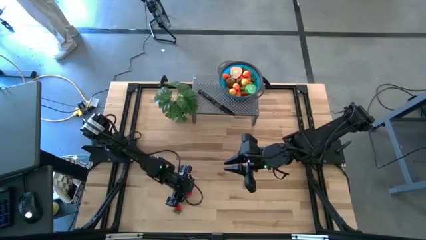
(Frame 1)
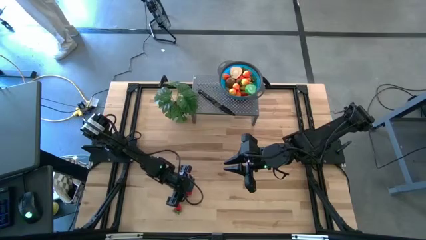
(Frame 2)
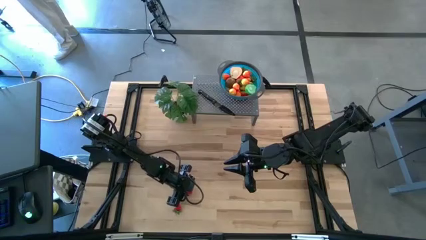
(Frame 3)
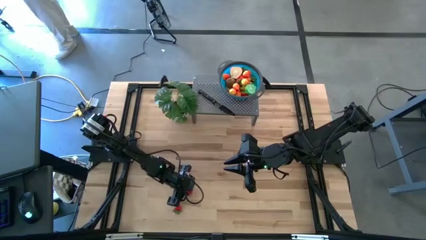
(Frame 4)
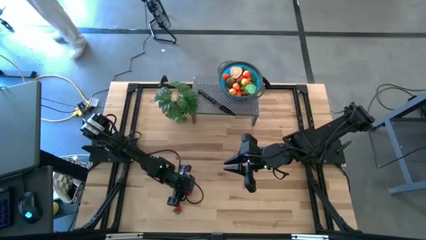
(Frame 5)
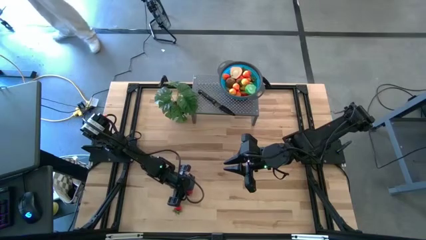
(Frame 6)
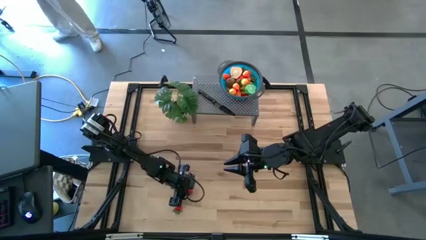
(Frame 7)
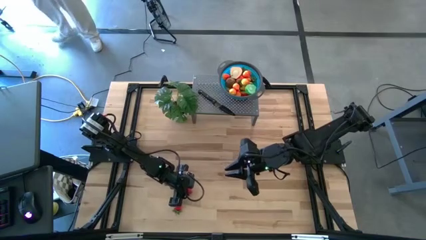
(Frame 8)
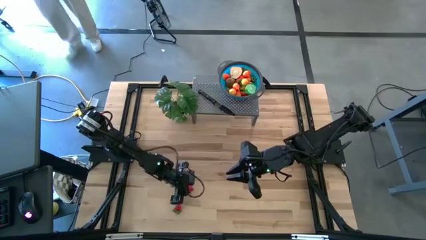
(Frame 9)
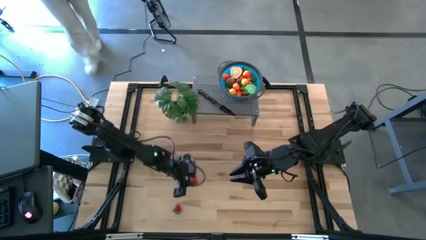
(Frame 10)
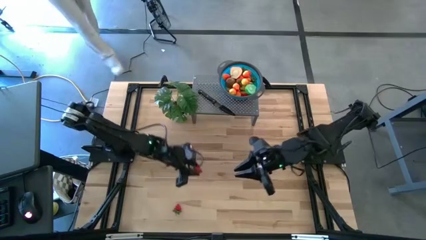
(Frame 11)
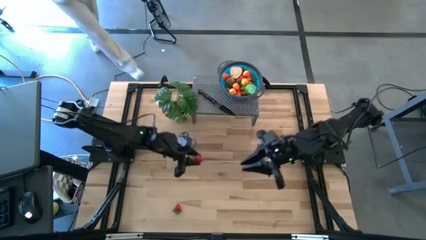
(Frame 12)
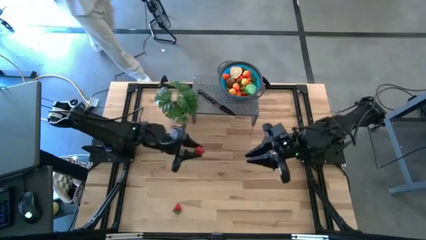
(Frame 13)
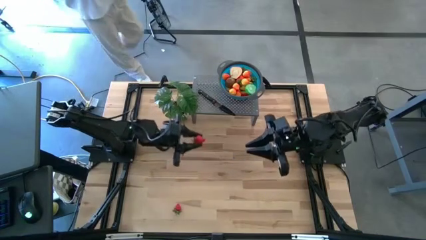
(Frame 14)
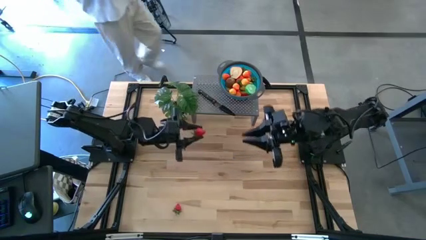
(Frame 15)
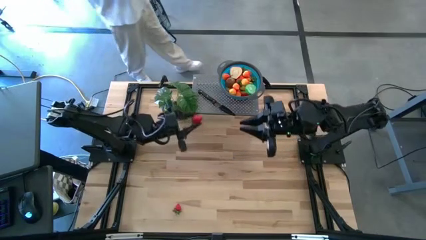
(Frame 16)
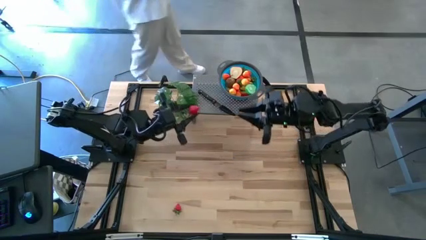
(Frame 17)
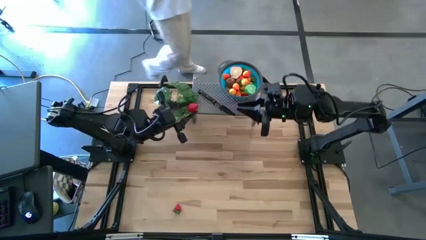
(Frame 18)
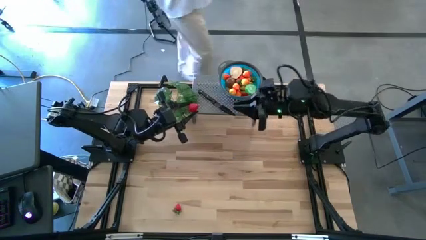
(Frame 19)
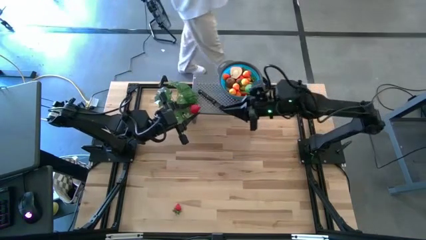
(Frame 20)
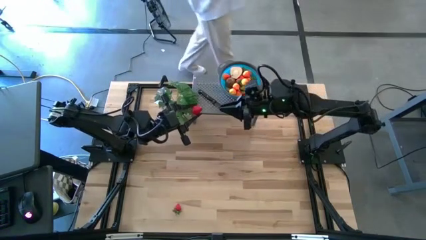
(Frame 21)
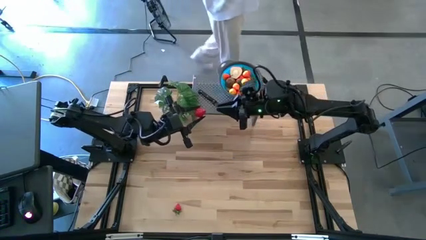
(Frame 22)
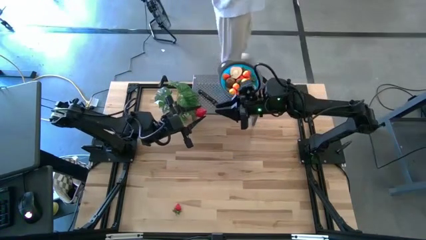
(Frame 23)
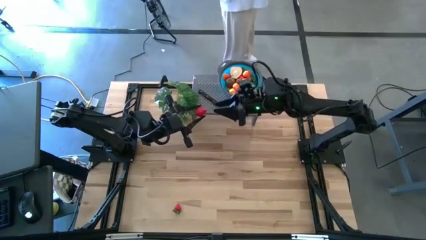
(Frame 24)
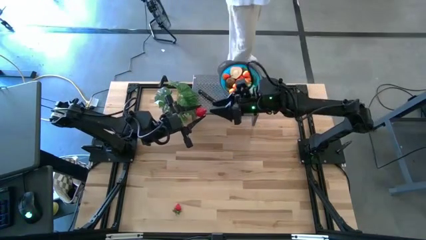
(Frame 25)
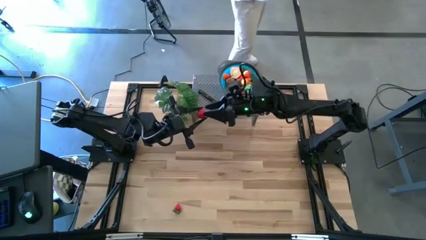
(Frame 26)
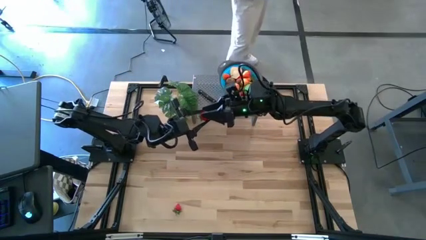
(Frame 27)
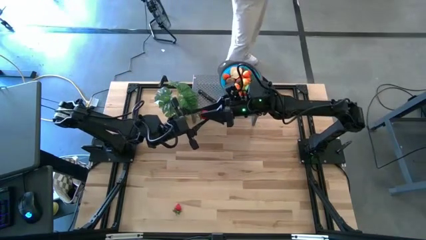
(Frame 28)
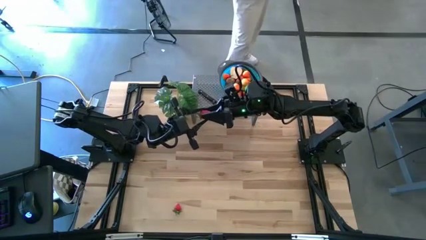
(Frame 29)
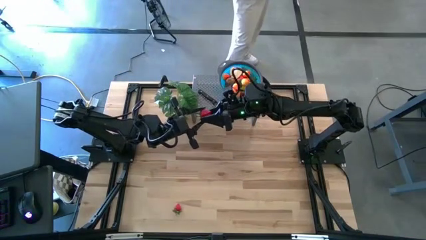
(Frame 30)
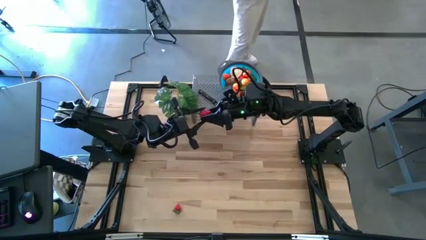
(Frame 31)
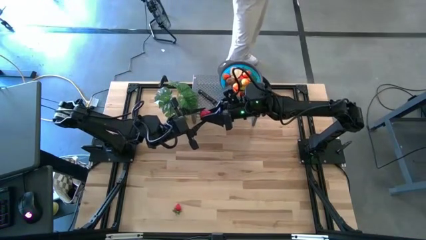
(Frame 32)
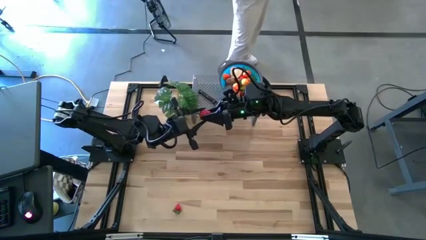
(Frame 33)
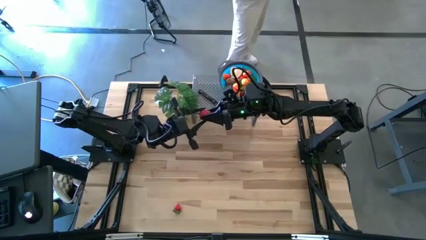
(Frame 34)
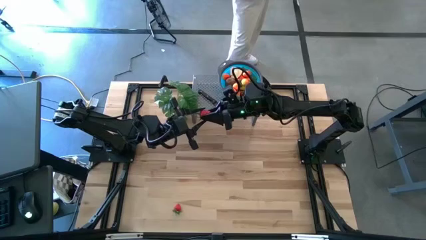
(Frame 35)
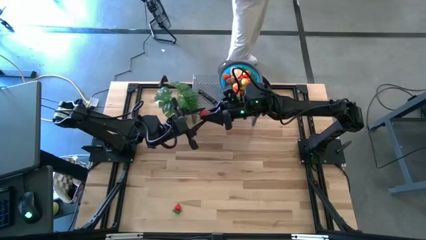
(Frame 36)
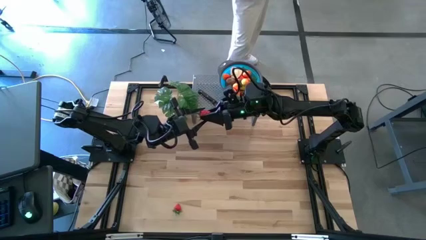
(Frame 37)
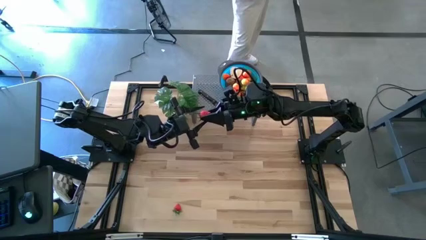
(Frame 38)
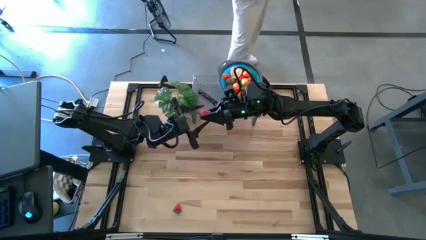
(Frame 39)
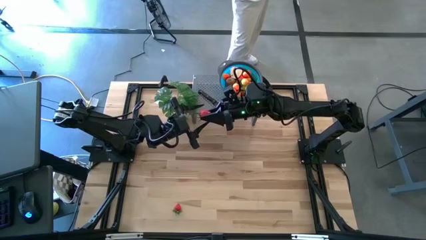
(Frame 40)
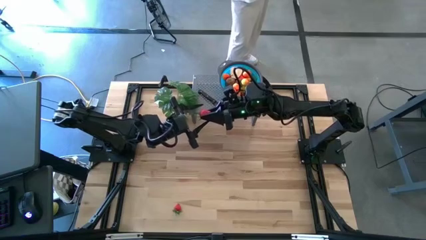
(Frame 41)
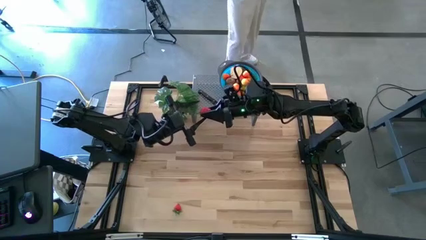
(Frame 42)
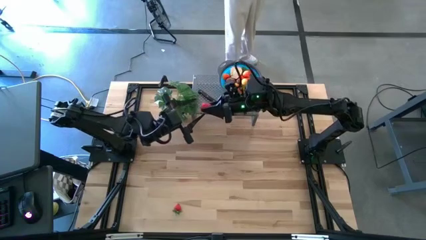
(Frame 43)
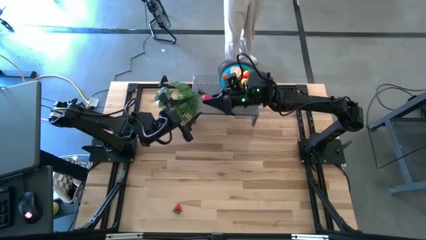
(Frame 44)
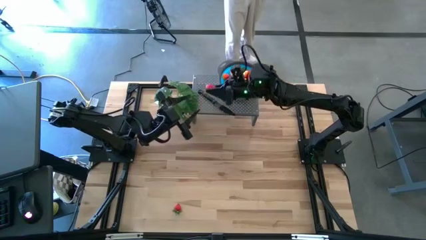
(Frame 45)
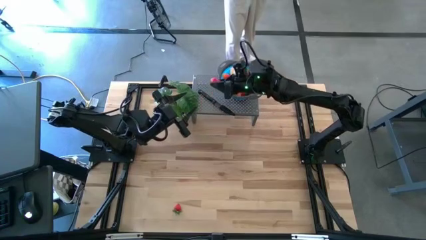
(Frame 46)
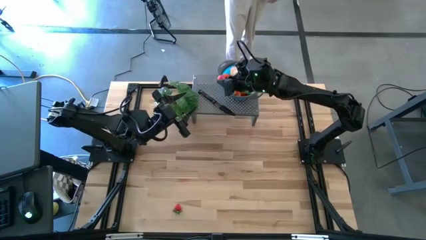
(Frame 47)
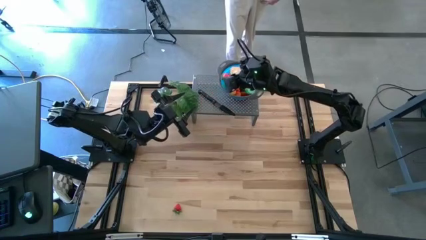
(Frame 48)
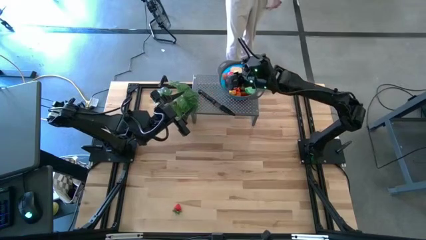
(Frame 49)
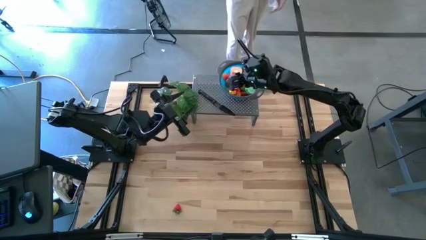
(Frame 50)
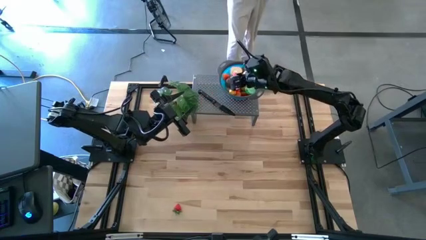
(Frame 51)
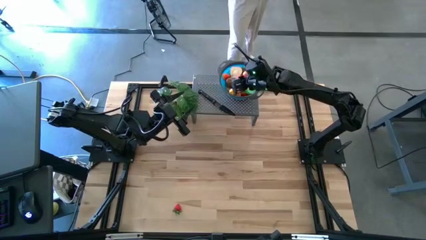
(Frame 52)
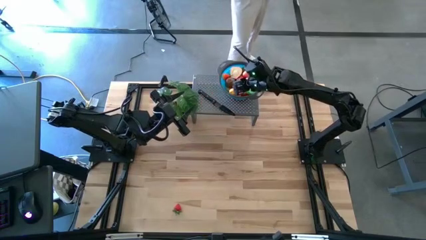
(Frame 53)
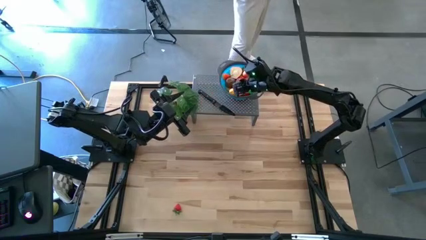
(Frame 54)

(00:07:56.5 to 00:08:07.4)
Task: Pick & Place Fruit
Put the red strawberry in the blue bowl on the shelf

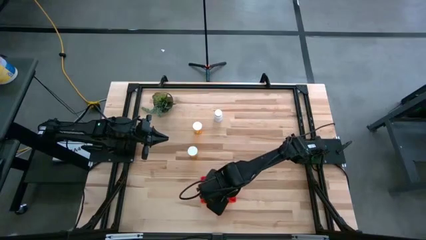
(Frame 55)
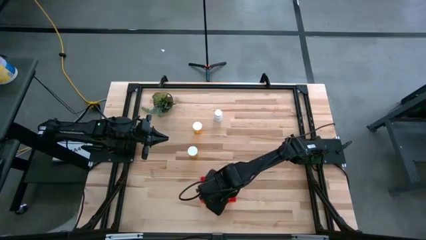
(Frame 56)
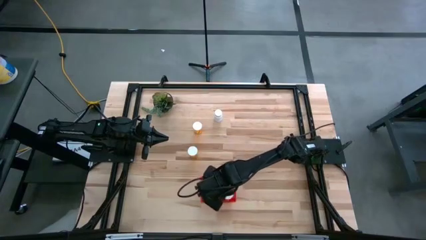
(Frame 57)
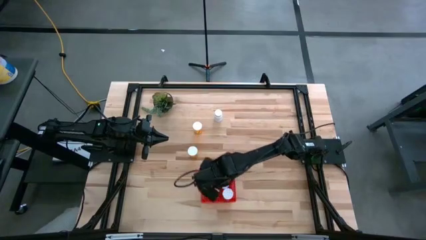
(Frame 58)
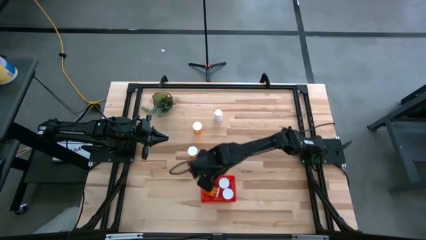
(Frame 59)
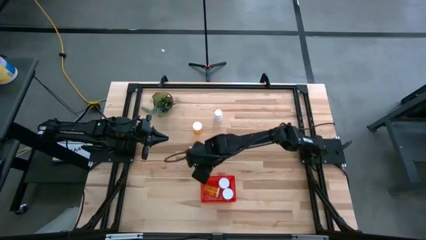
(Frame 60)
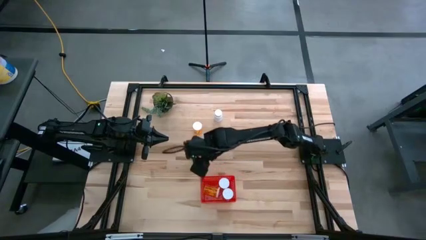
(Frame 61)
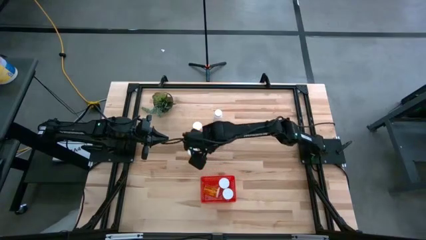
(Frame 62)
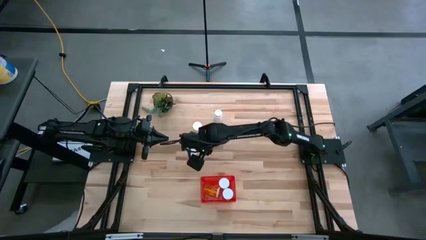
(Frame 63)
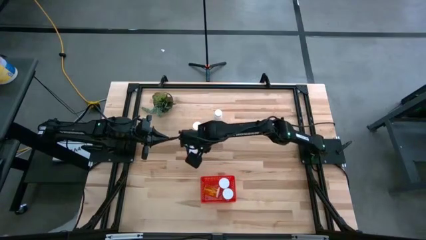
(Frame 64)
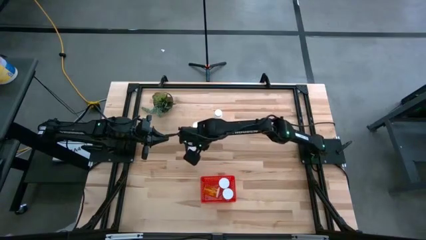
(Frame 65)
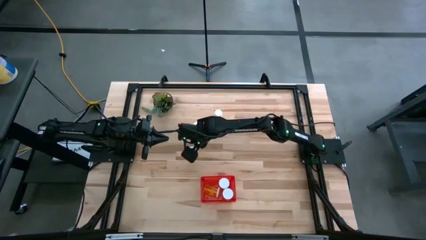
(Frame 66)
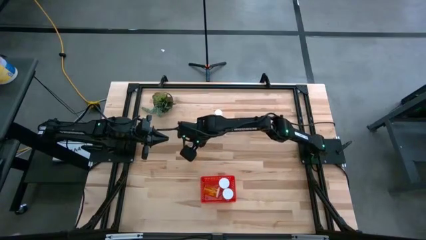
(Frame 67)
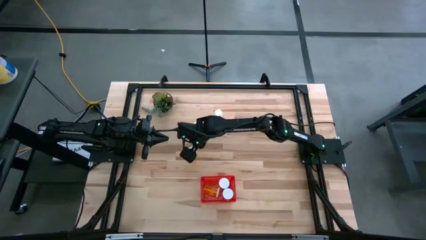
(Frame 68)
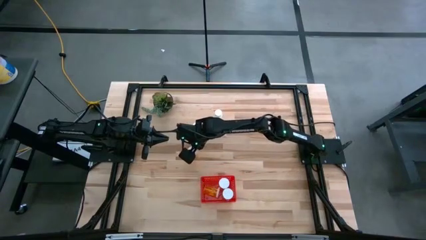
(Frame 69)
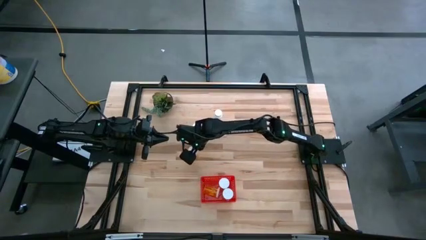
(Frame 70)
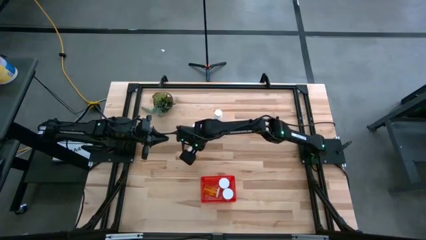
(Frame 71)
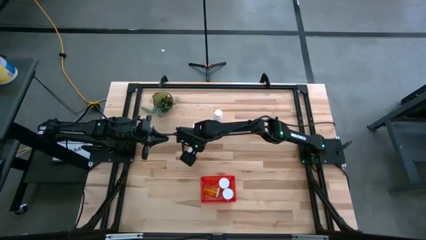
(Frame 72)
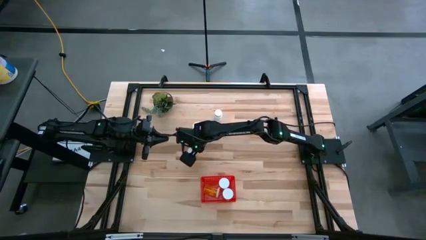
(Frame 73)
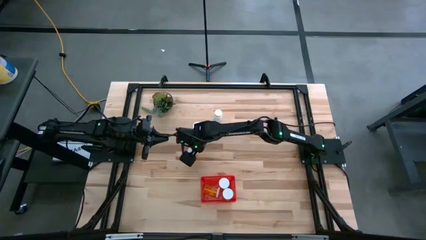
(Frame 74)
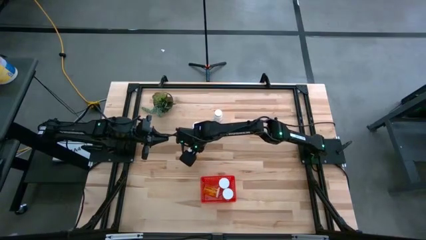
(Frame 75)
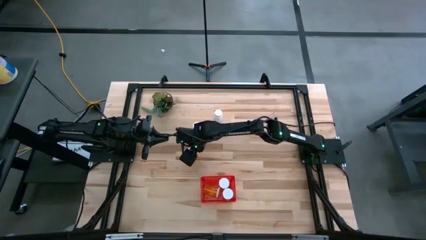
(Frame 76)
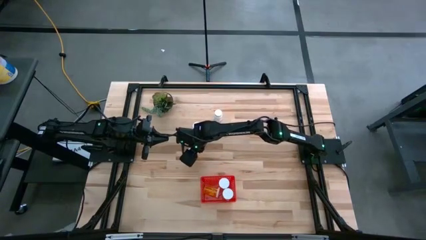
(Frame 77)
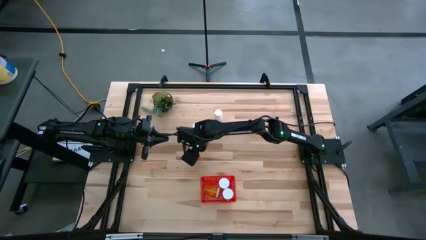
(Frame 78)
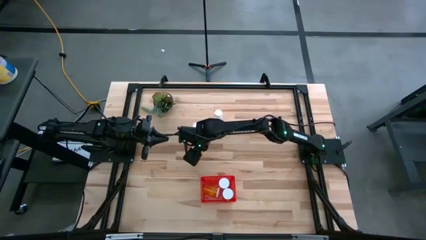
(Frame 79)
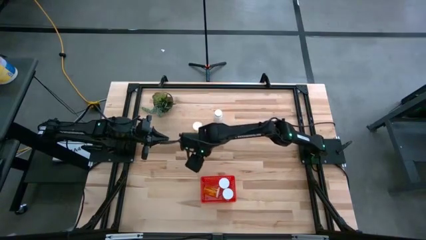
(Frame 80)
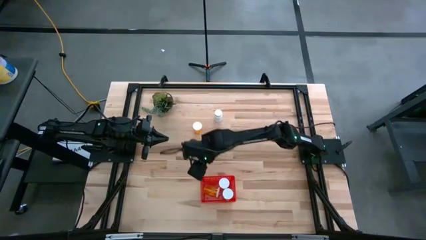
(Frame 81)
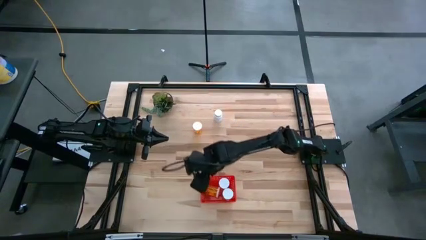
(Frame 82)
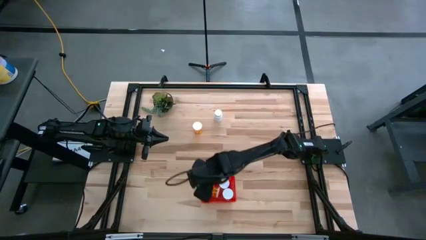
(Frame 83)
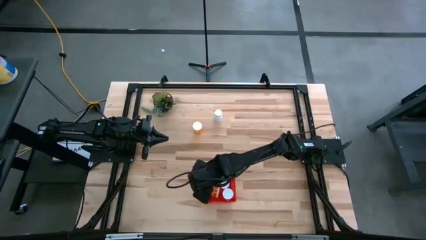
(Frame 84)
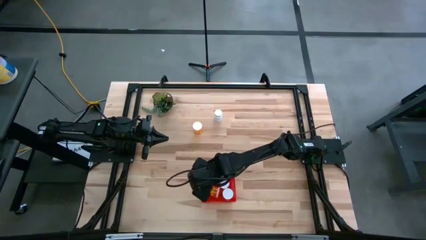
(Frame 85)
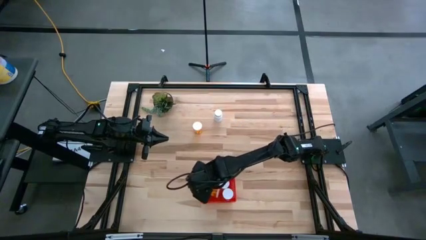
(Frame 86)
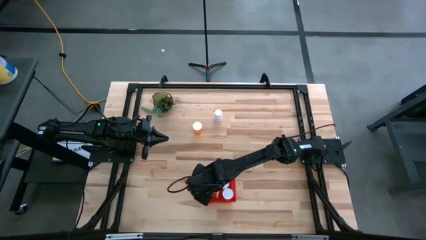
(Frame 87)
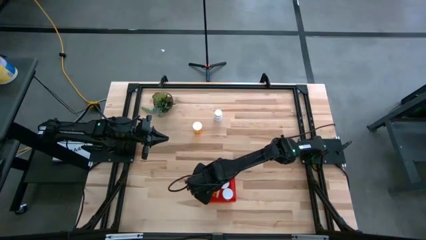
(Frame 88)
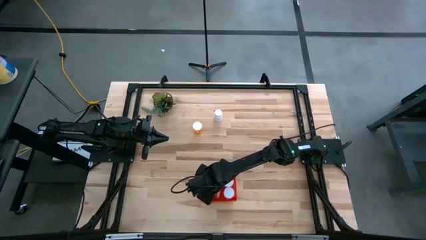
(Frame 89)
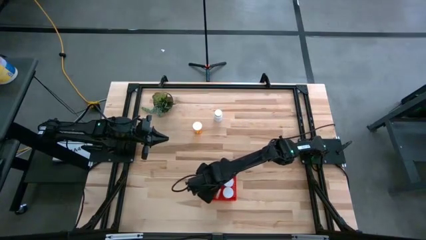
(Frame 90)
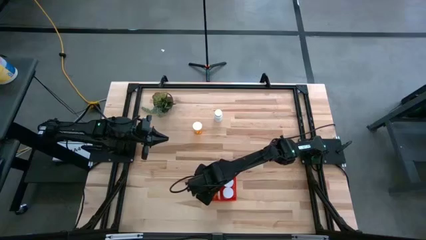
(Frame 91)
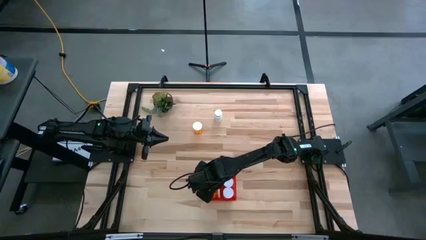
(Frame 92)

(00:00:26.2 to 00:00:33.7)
Task: Pick and place pill bottles into a basket
Put the orange pill bottle into the red bin
